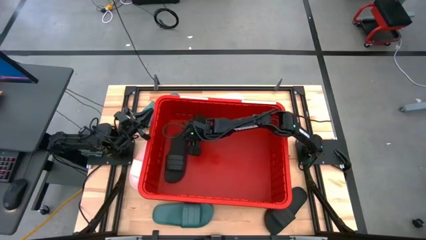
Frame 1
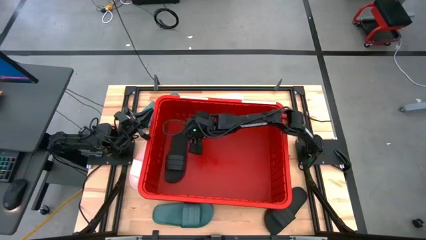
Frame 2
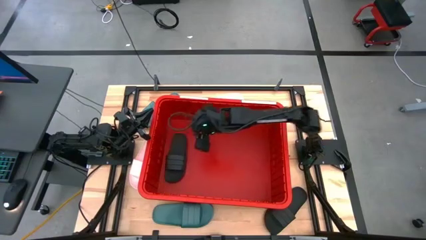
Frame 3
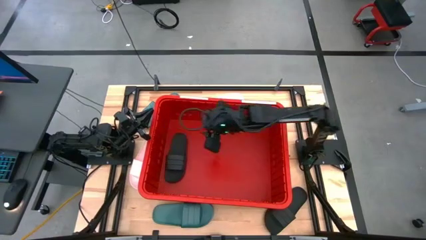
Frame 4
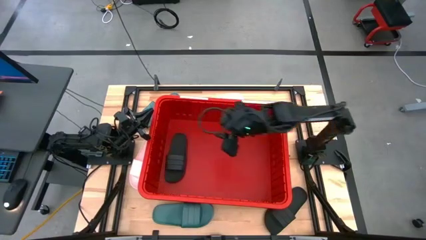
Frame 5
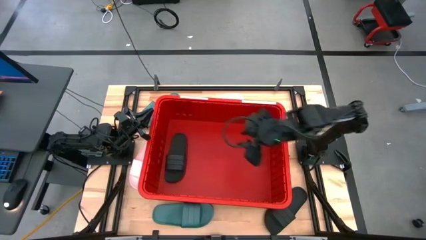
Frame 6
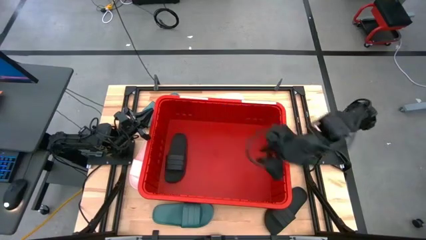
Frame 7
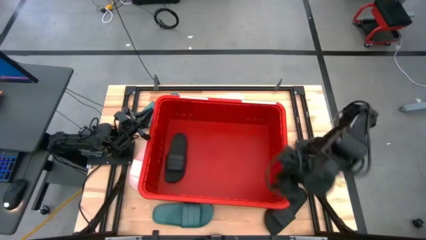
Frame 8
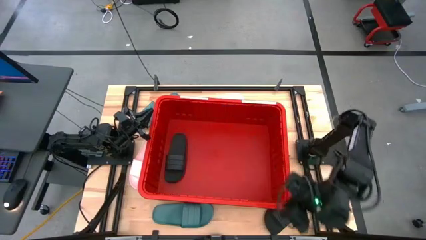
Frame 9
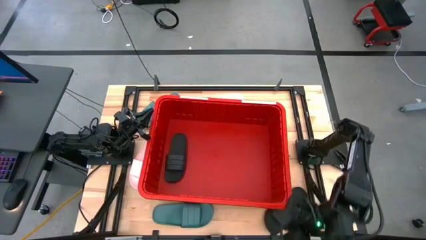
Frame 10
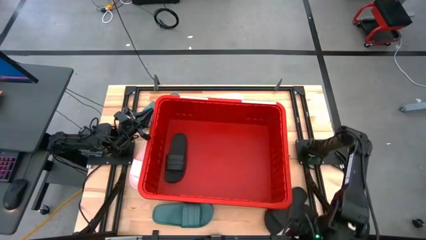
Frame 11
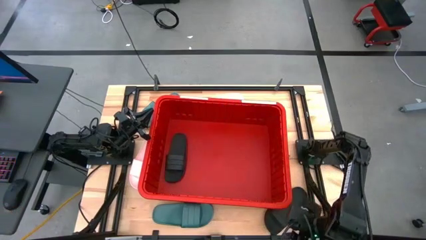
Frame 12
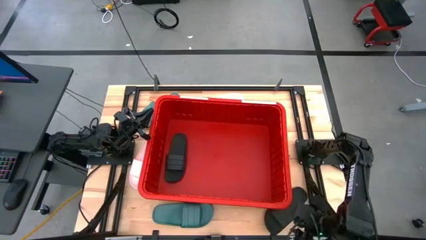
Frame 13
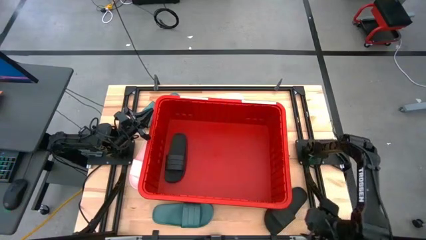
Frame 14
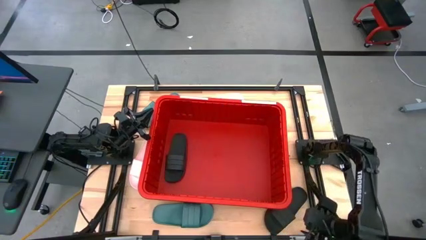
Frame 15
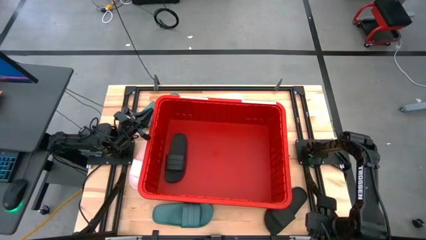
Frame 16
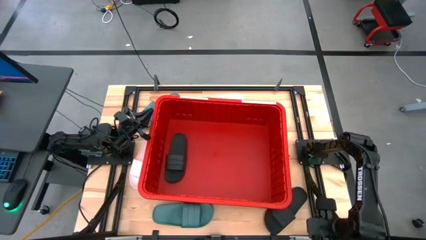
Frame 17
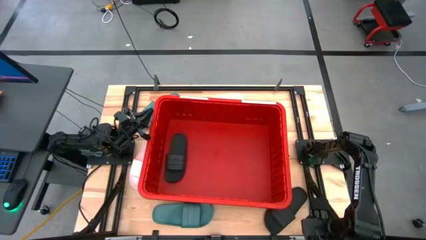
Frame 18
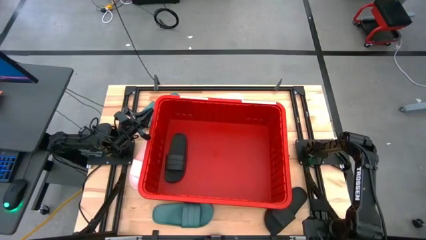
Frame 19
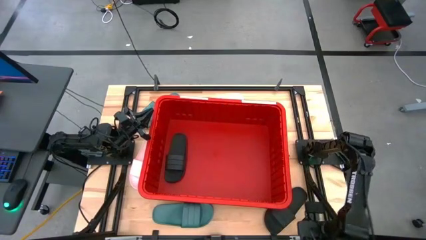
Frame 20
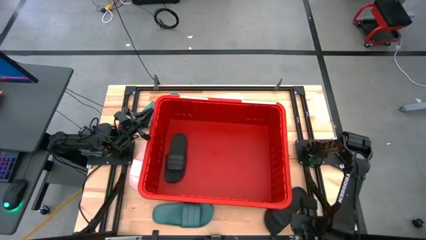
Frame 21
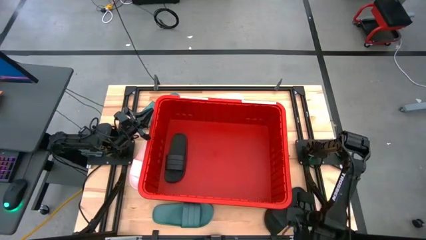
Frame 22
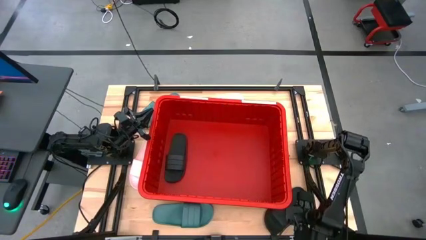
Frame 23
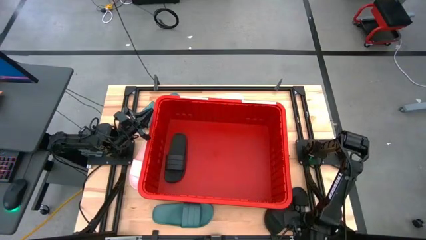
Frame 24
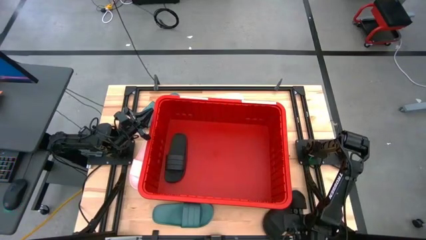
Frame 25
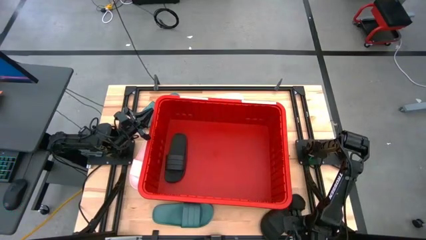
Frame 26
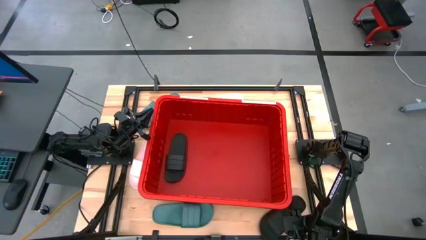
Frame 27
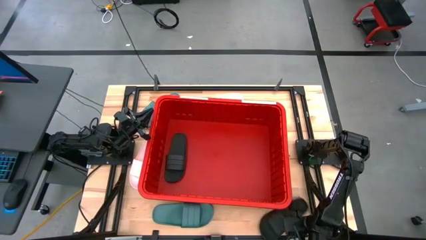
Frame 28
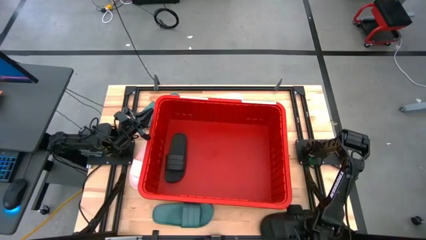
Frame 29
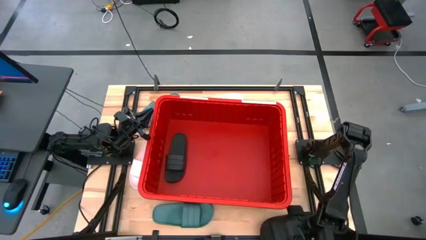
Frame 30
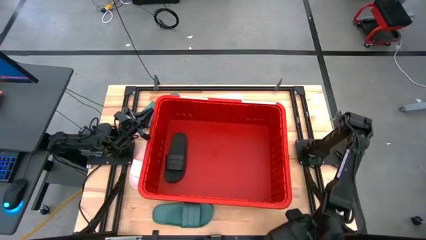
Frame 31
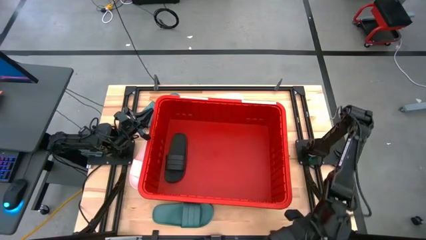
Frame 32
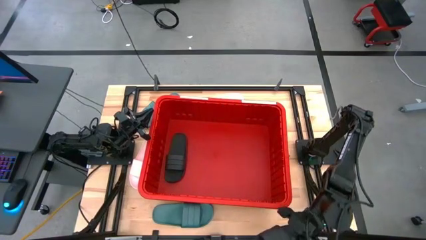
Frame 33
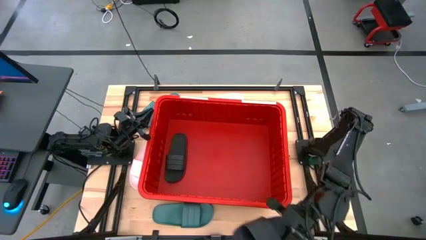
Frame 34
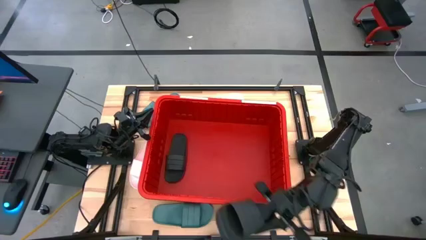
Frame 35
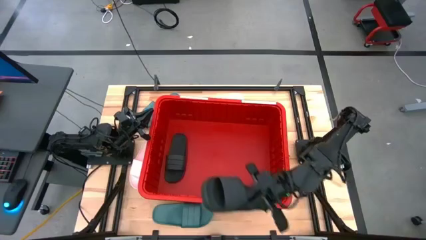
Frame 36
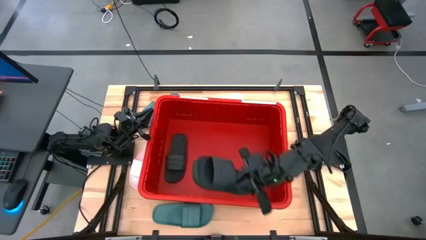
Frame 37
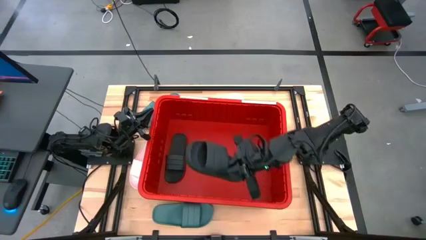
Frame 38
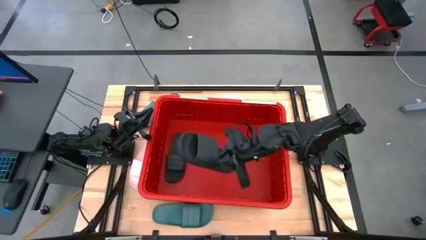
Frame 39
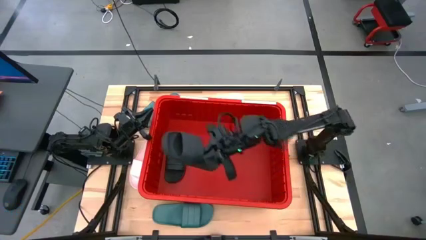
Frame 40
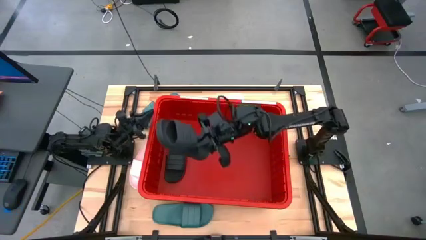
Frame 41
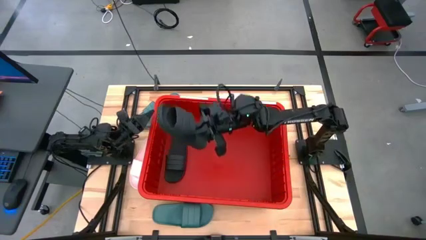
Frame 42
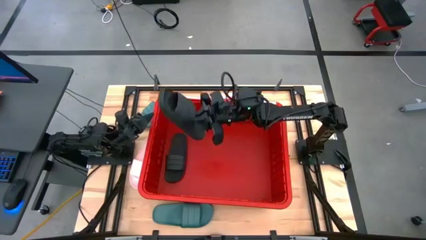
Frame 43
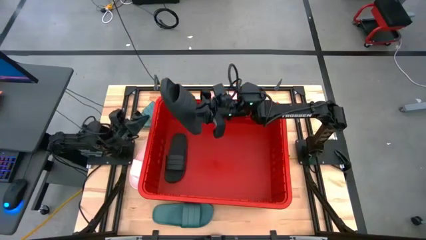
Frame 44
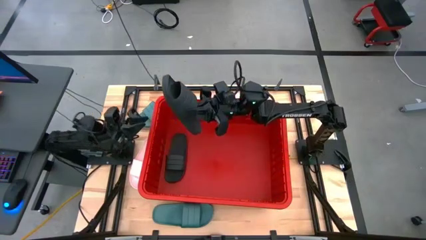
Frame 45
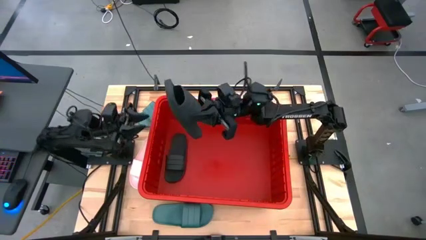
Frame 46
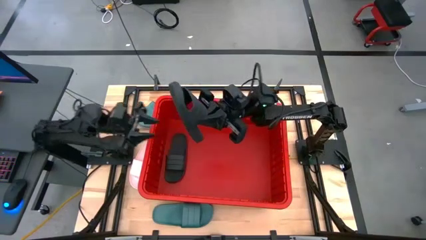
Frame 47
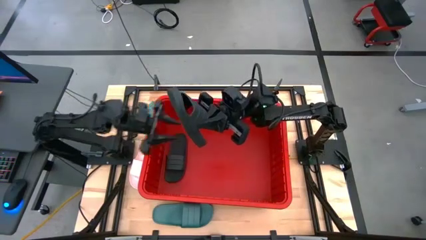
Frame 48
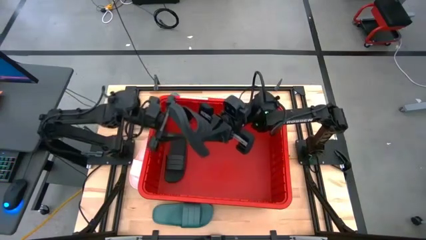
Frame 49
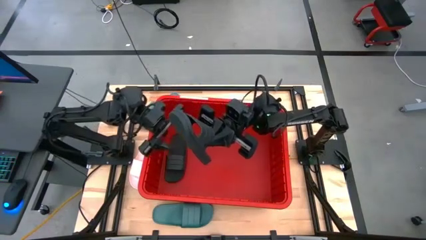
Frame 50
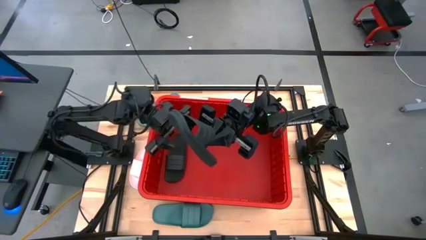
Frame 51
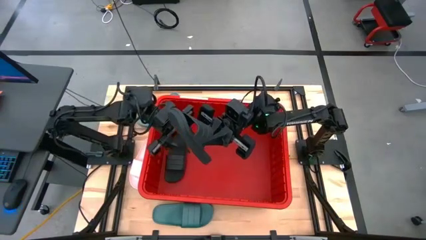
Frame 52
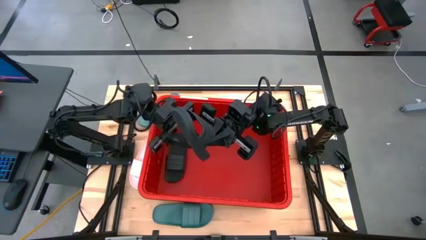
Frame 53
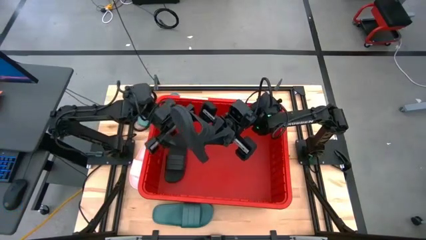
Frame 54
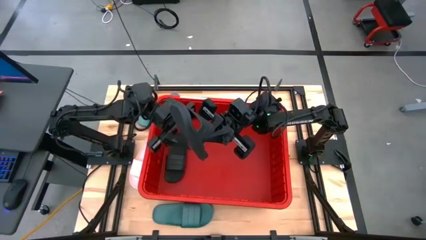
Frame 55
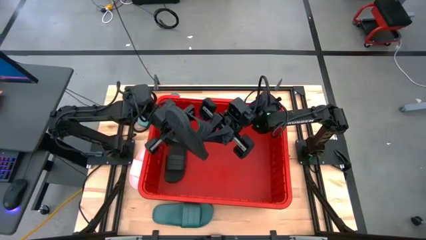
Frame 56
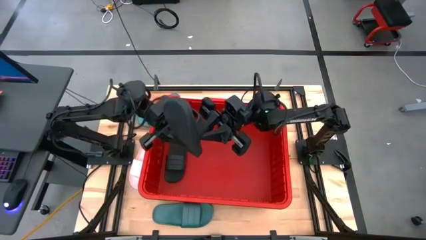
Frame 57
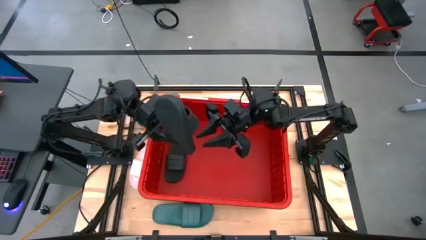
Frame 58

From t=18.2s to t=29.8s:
Task: Pick and place slides into bin
Put the black slide on top of the other black slide in the container
